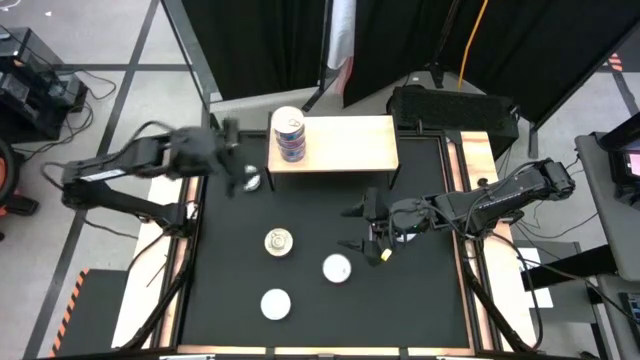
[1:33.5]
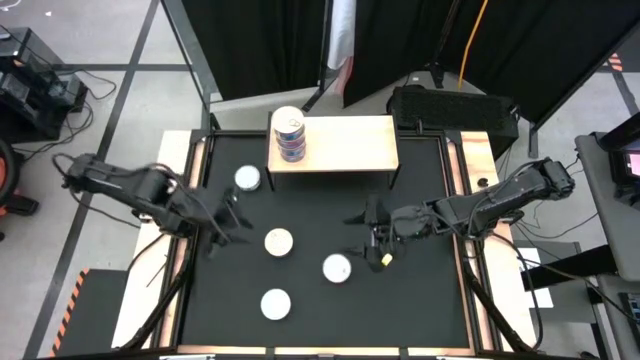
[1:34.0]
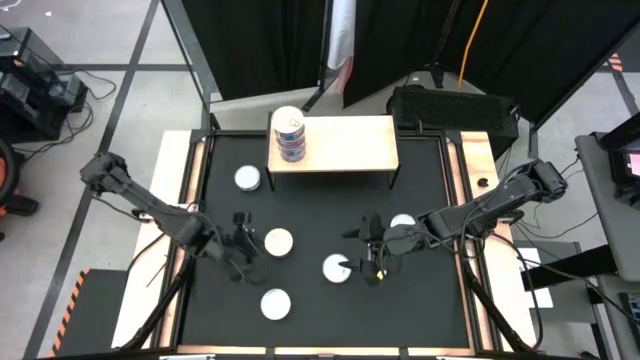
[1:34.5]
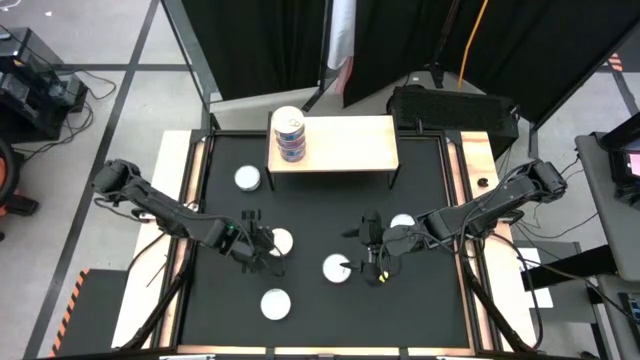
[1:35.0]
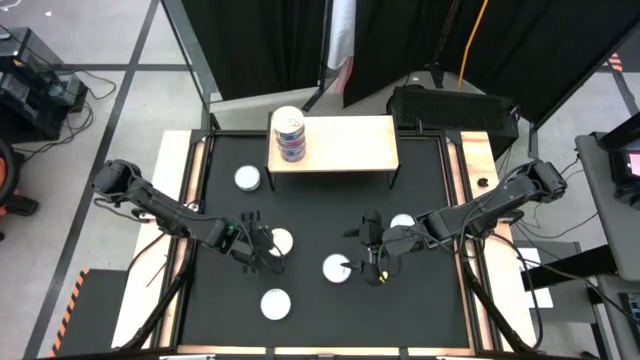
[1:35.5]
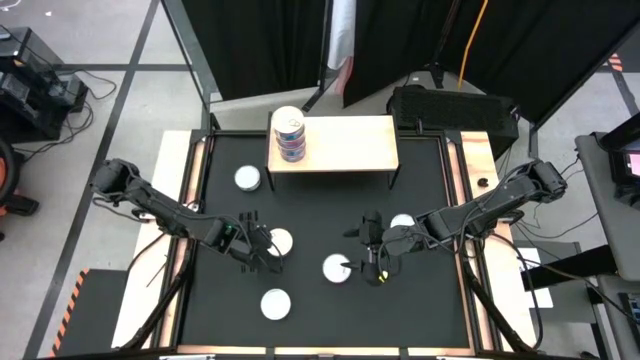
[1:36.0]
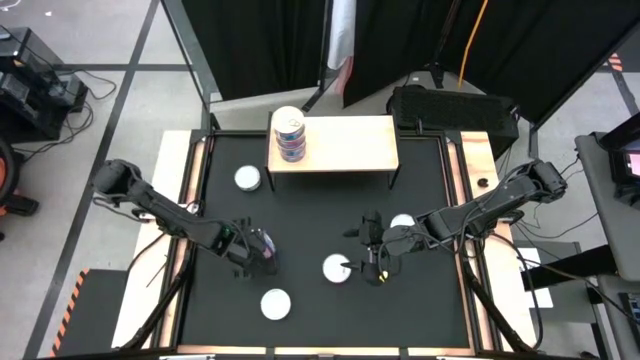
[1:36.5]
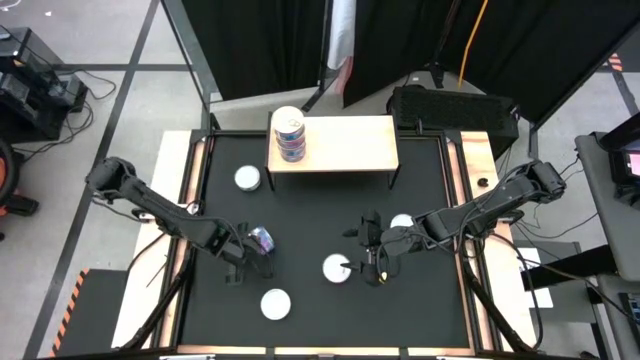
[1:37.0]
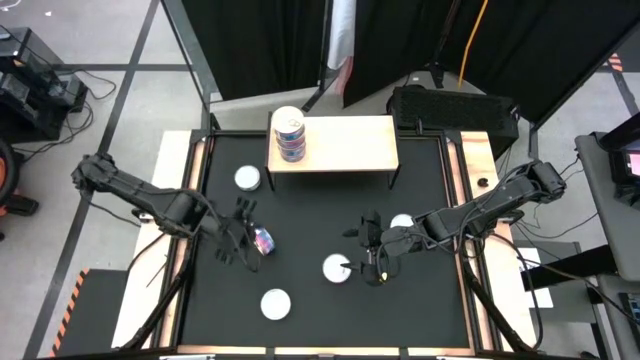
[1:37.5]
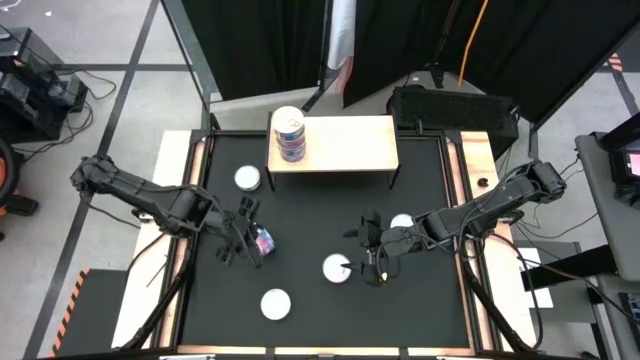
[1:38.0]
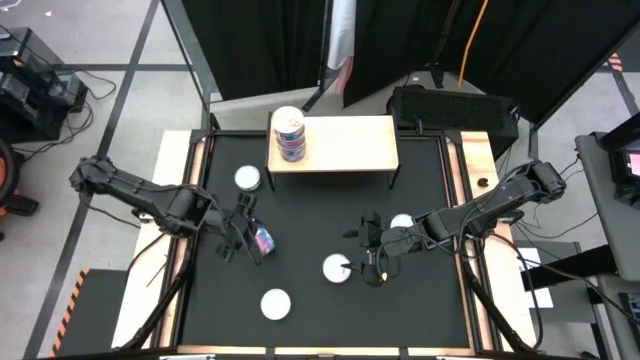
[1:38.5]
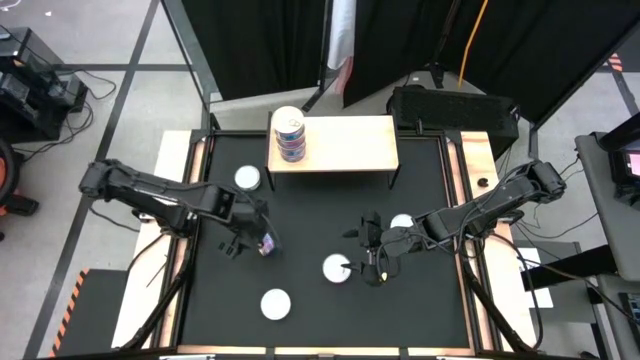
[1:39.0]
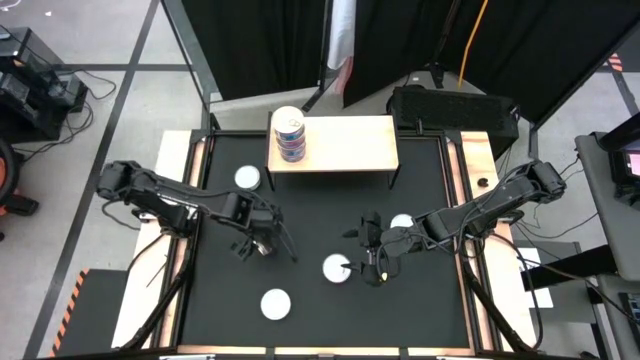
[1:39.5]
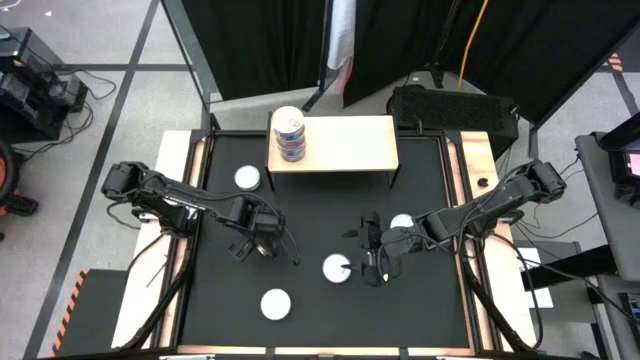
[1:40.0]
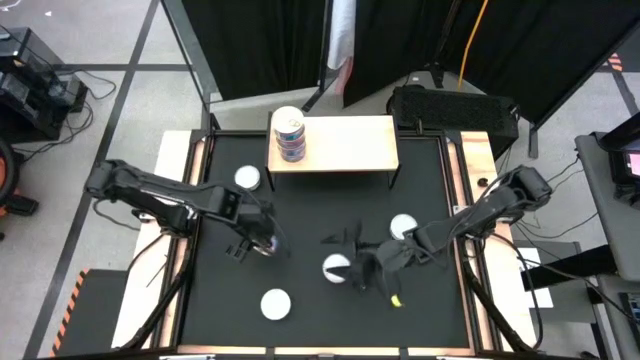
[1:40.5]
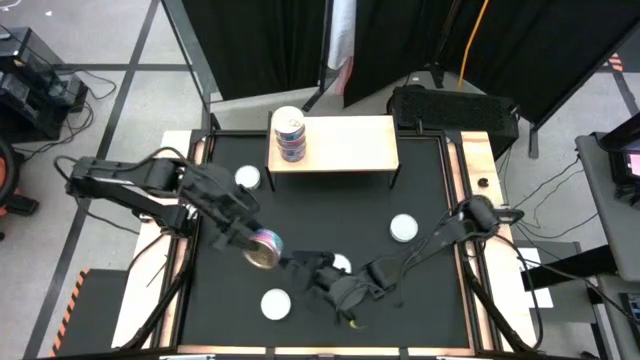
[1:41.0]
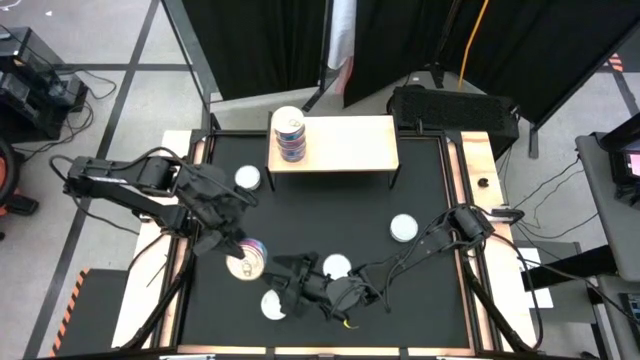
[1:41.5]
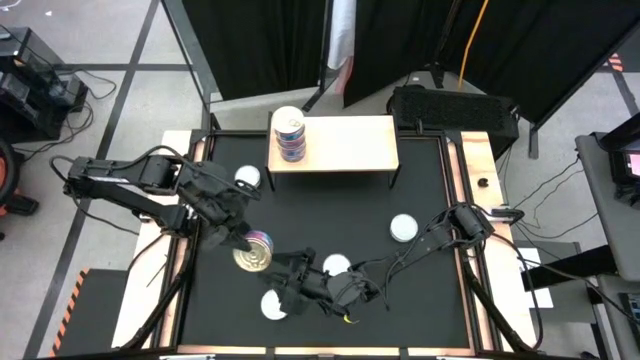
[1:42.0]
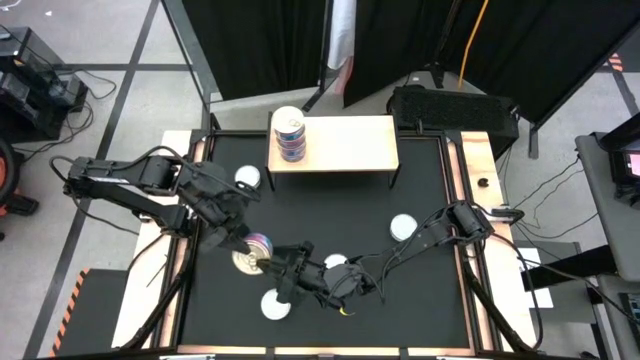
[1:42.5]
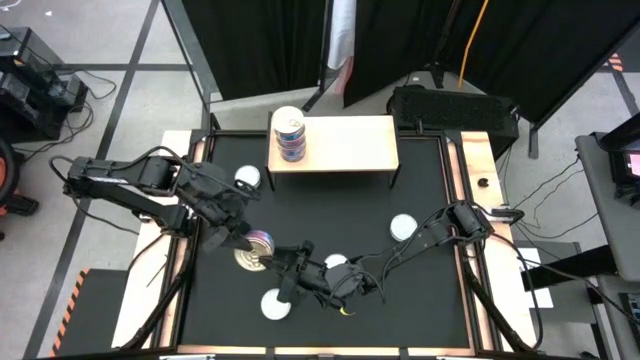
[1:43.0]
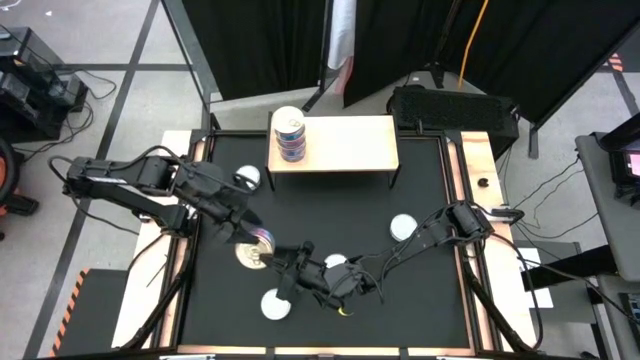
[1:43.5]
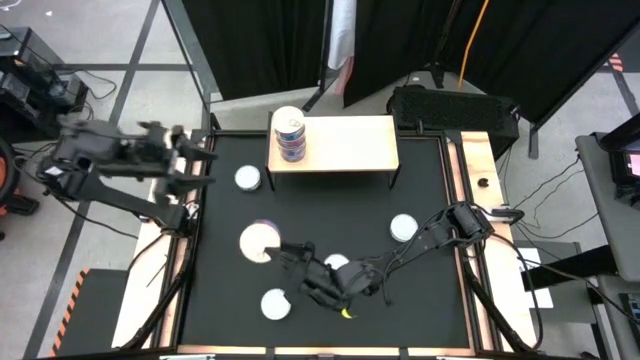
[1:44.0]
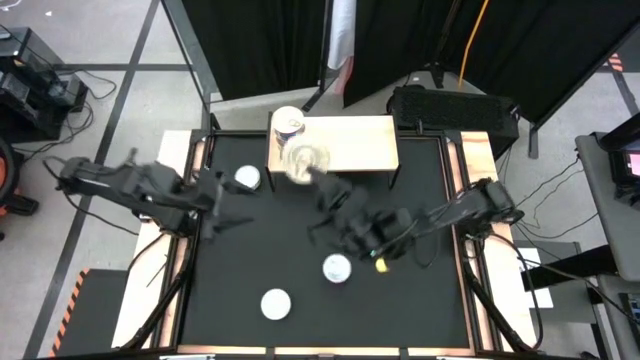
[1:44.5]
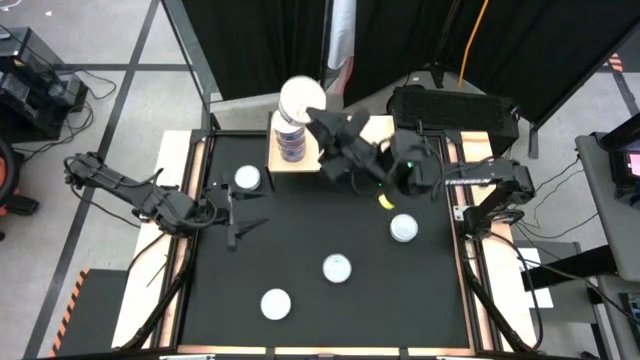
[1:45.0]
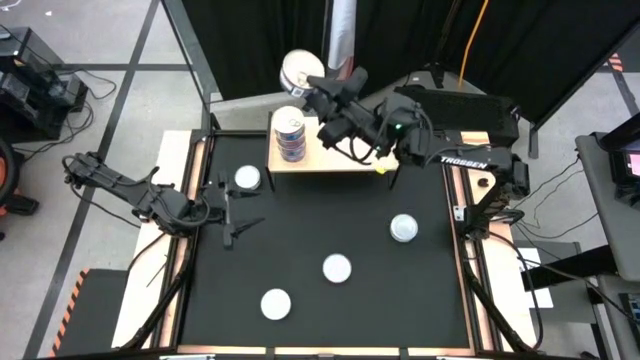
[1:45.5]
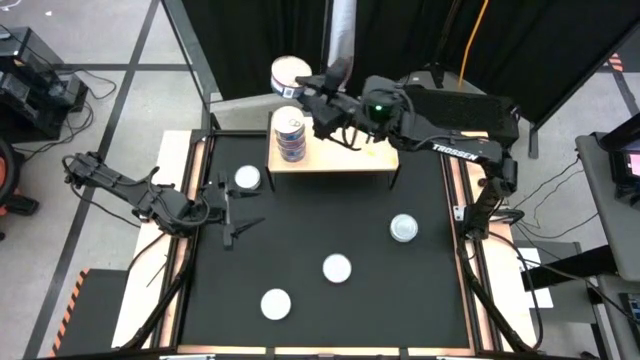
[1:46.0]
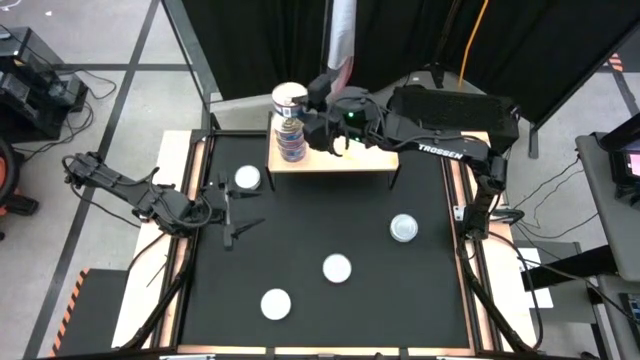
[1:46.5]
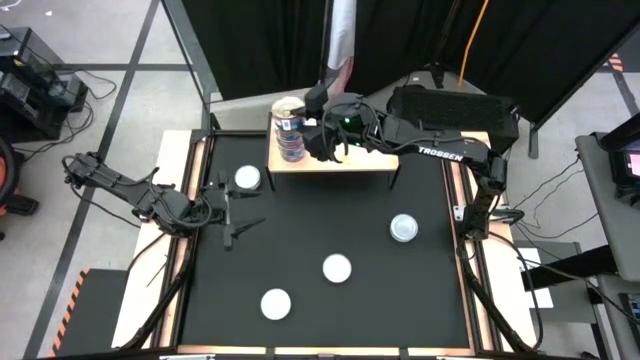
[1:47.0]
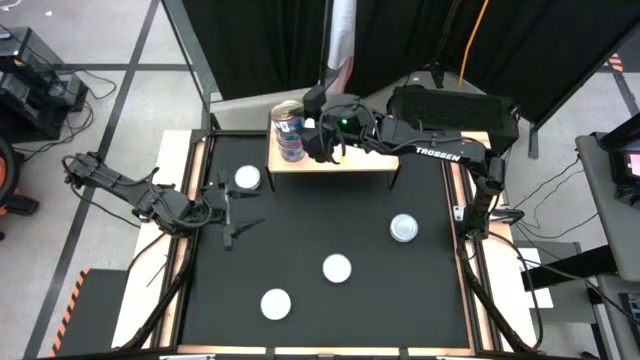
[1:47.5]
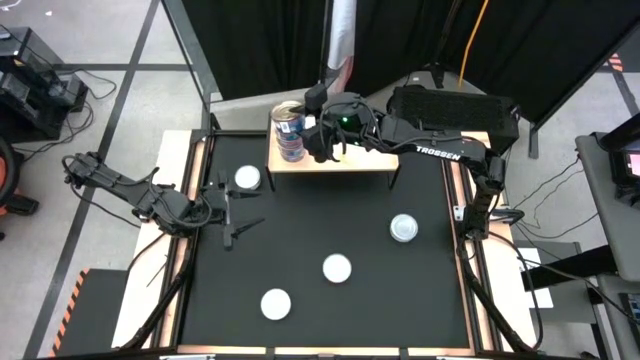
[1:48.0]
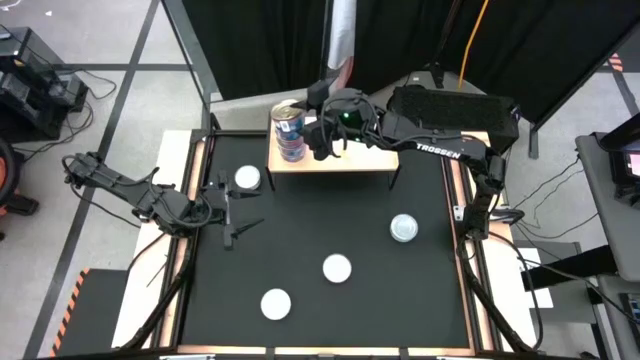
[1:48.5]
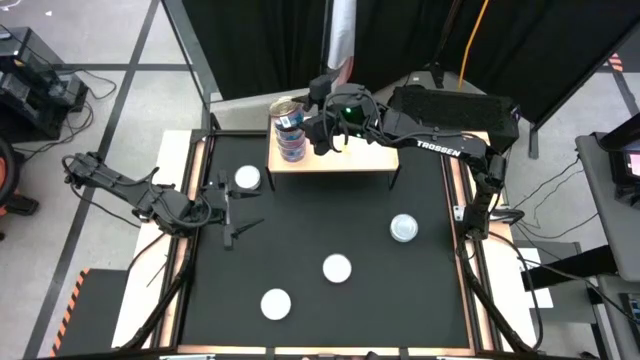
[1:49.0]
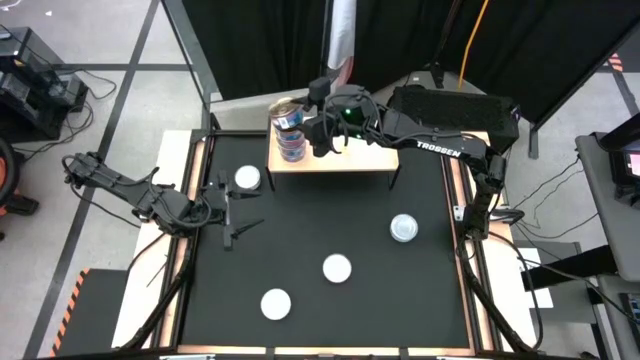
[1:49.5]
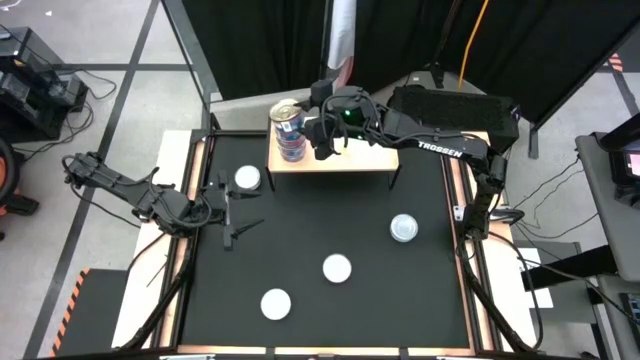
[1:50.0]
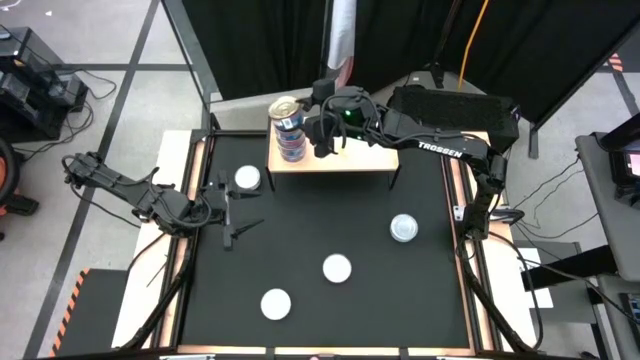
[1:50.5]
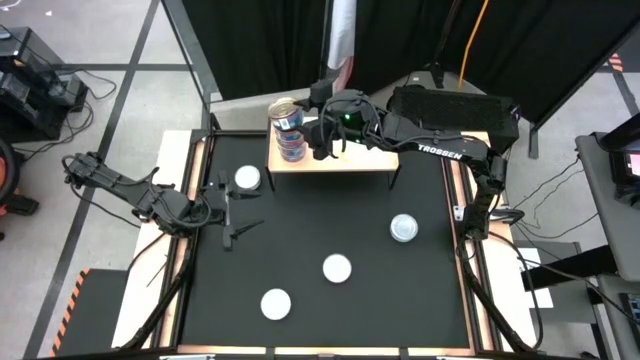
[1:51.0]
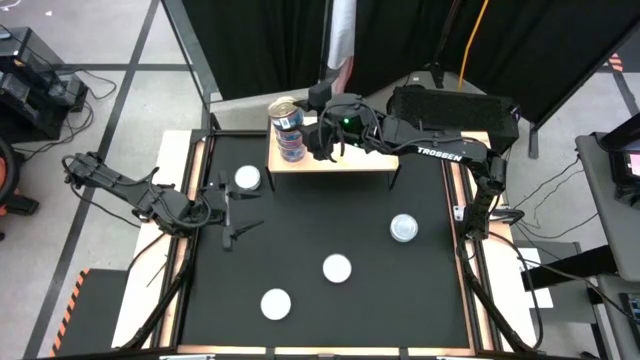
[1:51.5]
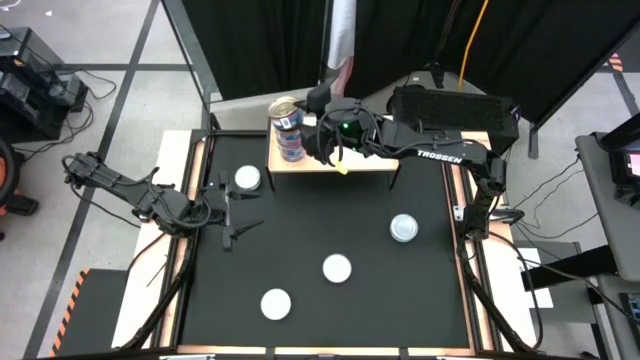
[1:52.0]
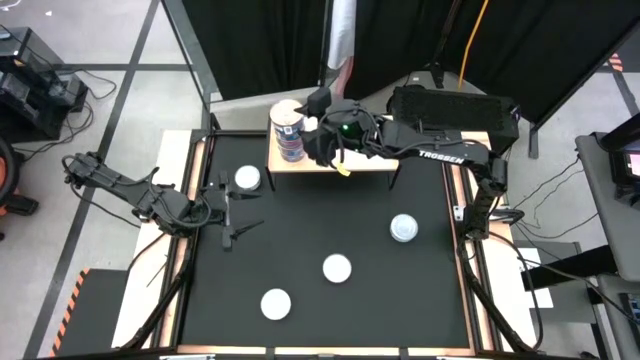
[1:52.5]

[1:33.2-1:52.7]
Task: Stack canned seafood by type on shelf
Stack the blue pink tuna can on top of the other blue pink tuna can on the shelf

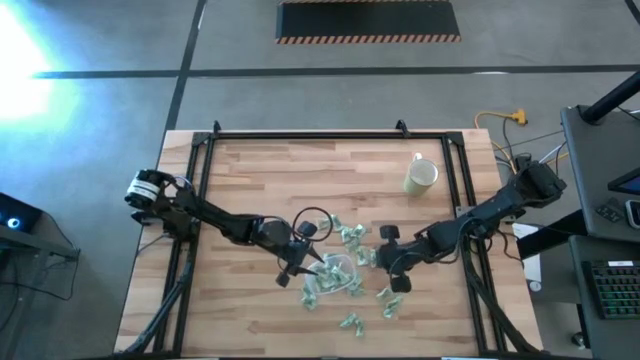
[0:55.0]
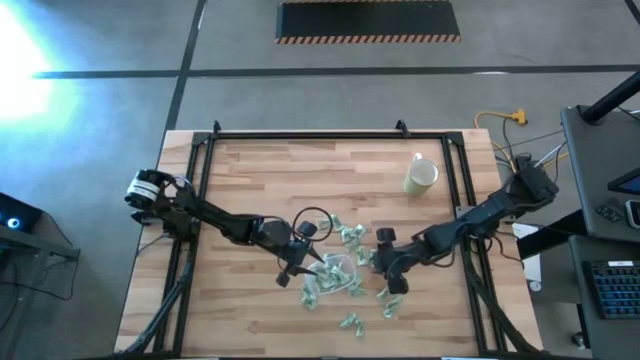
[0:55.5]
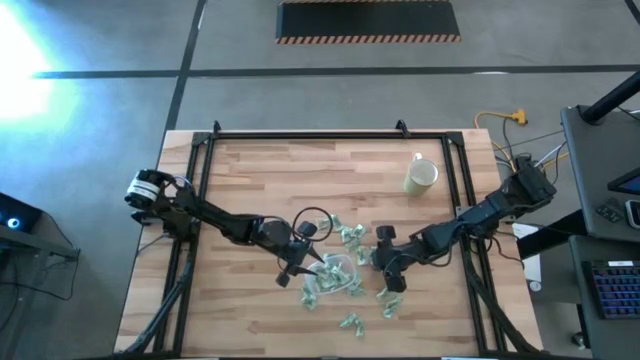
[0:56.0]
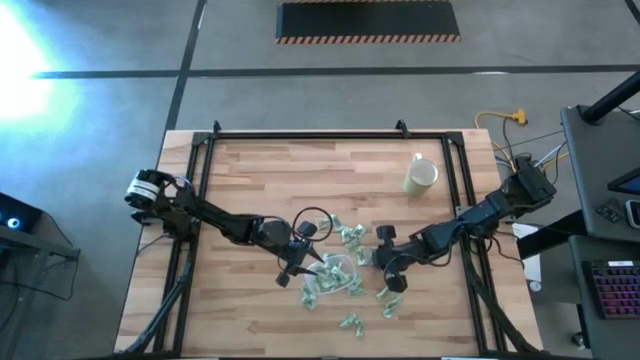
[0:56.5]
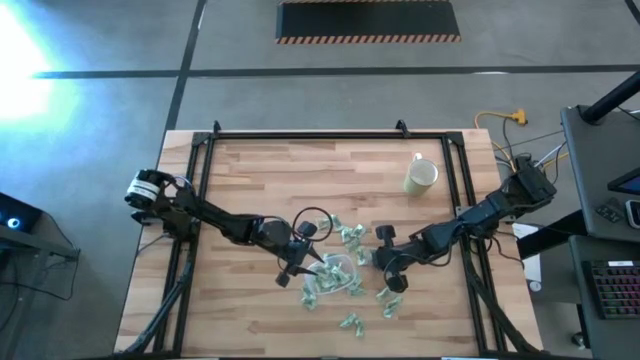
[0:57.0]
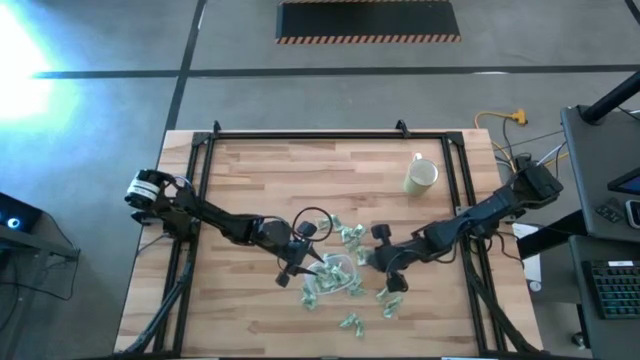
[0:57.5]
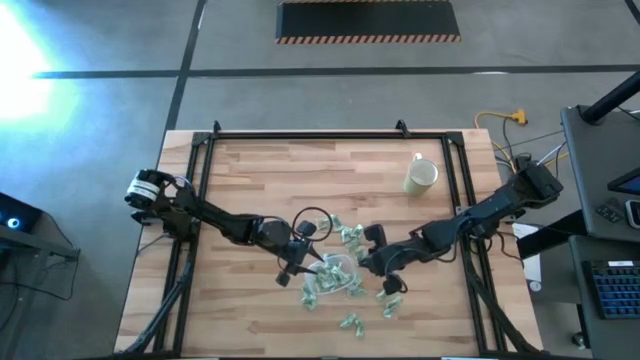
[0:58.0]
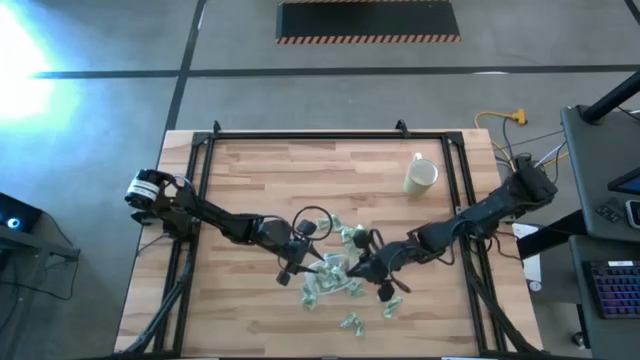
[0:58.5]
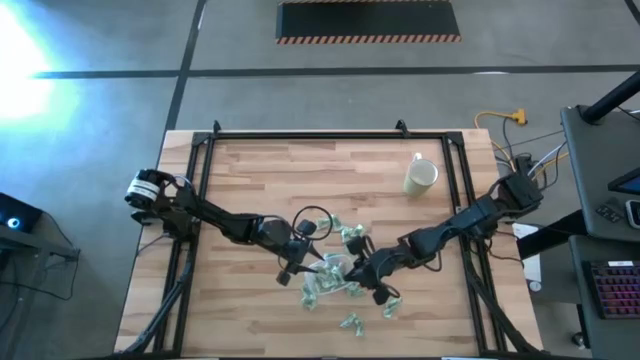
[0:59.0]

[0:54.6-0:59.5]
Task: Pick and place items into bin
Put the Stevia packet into the transparent bin
